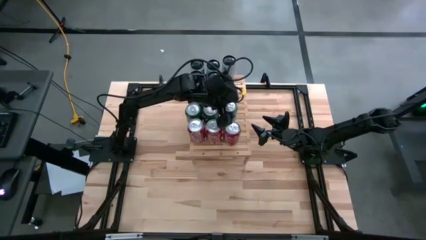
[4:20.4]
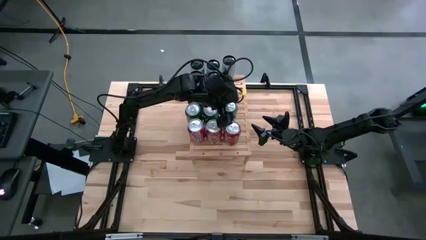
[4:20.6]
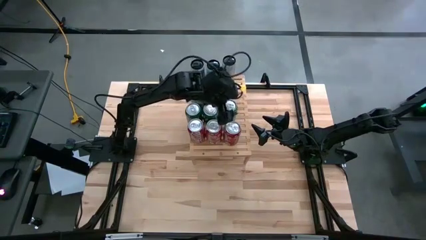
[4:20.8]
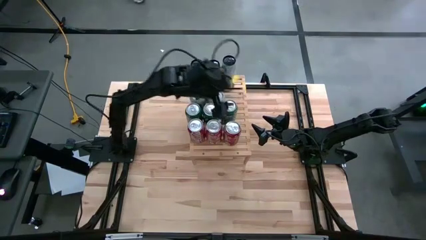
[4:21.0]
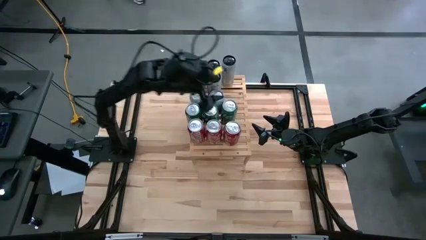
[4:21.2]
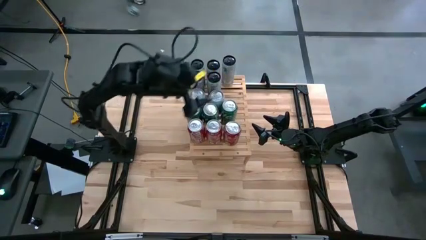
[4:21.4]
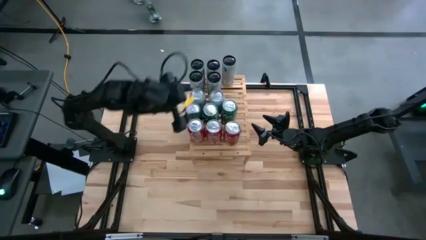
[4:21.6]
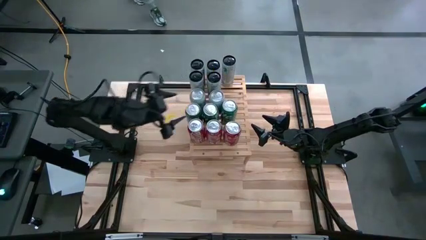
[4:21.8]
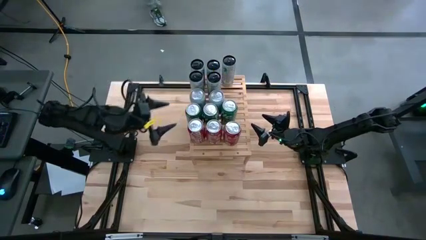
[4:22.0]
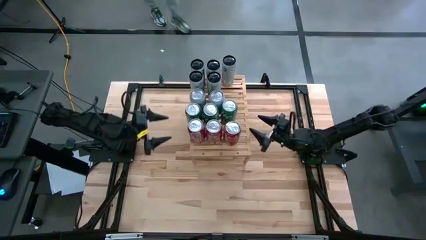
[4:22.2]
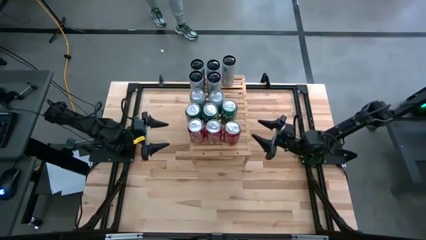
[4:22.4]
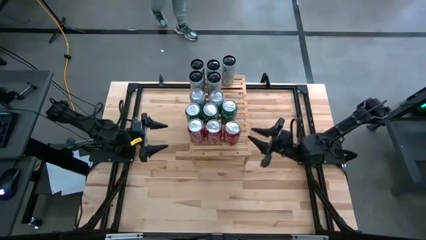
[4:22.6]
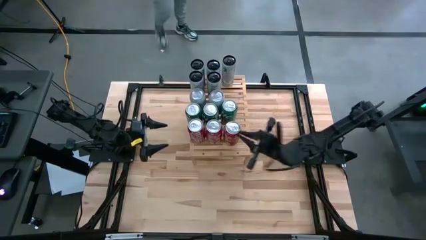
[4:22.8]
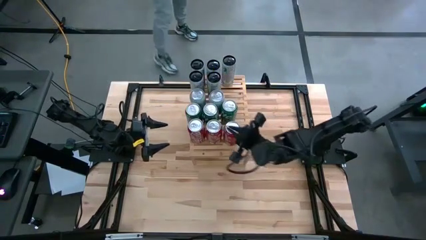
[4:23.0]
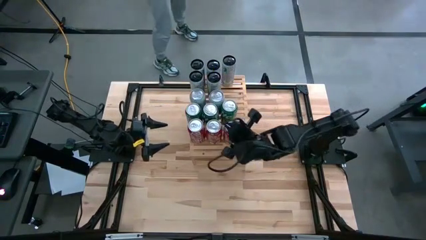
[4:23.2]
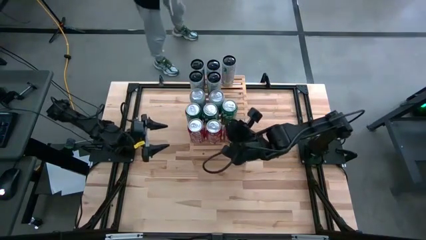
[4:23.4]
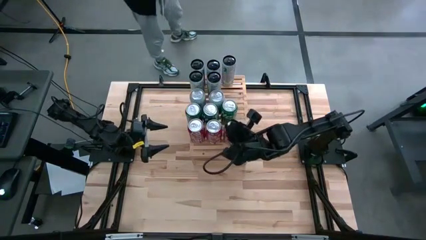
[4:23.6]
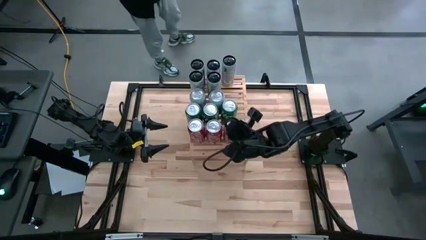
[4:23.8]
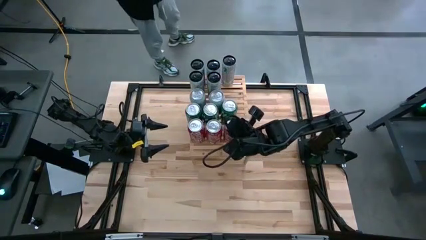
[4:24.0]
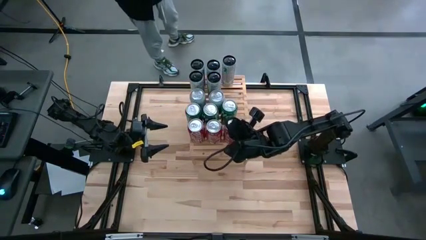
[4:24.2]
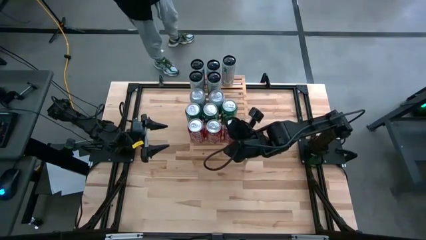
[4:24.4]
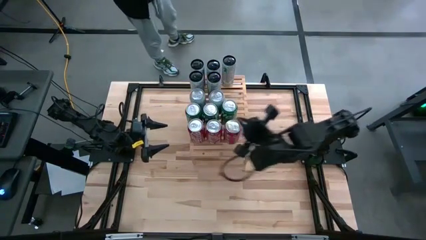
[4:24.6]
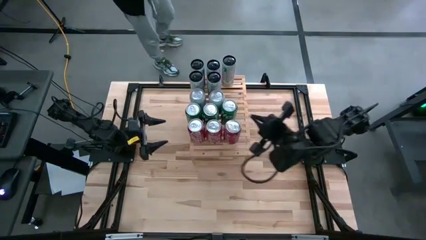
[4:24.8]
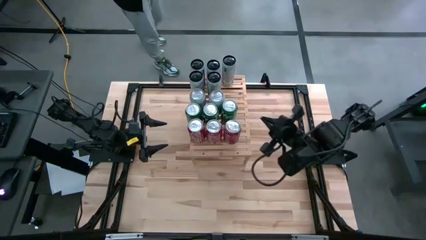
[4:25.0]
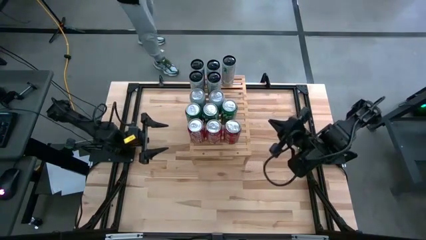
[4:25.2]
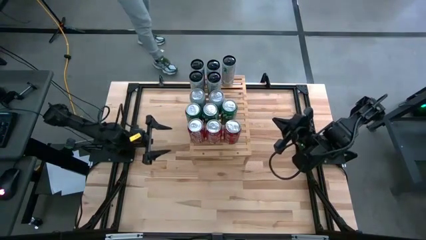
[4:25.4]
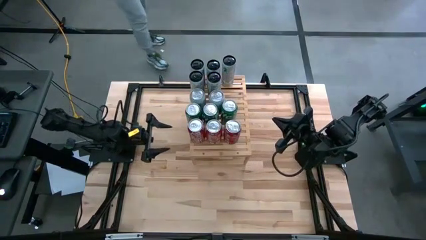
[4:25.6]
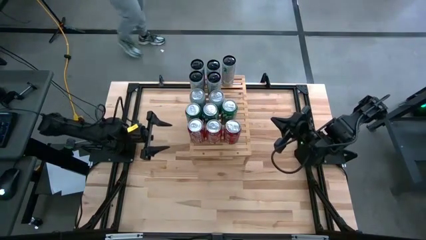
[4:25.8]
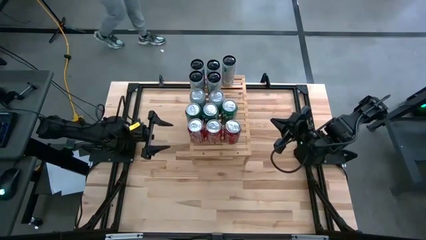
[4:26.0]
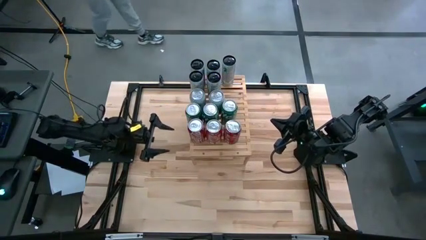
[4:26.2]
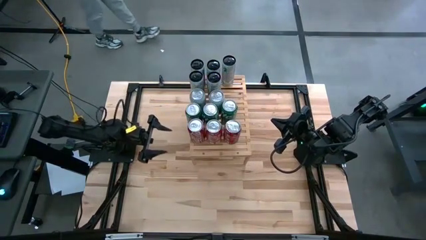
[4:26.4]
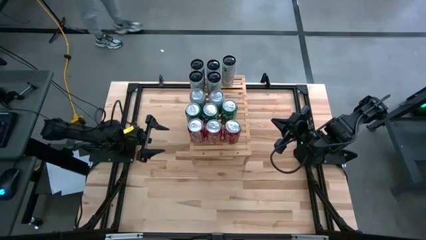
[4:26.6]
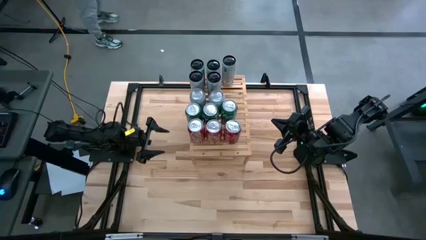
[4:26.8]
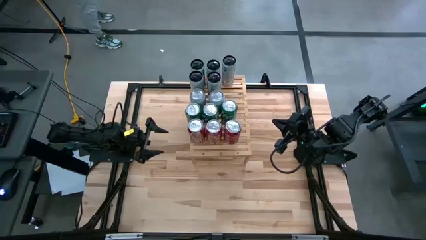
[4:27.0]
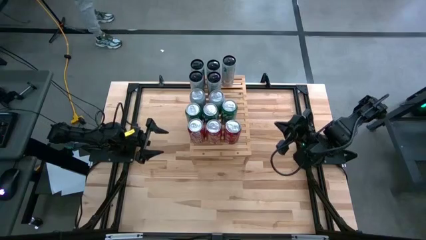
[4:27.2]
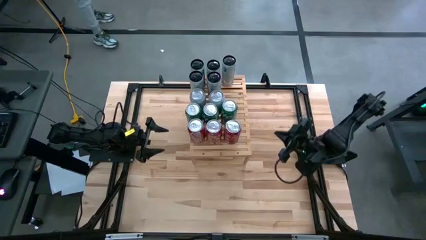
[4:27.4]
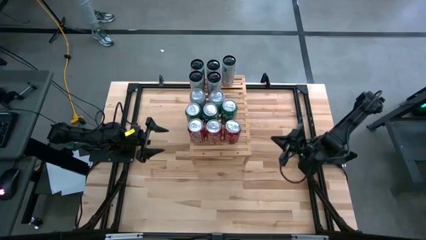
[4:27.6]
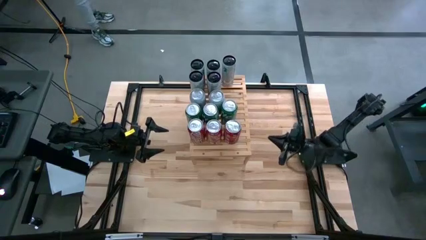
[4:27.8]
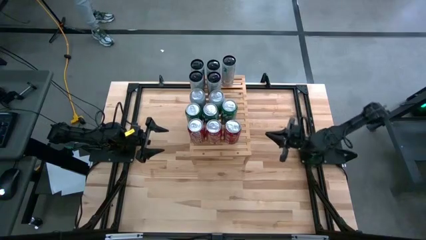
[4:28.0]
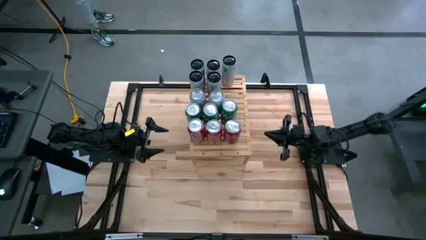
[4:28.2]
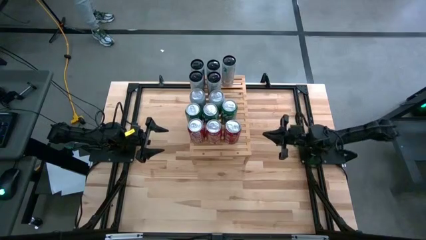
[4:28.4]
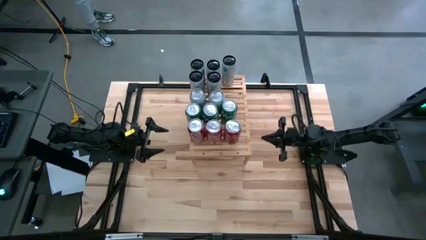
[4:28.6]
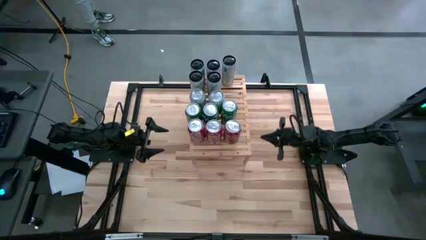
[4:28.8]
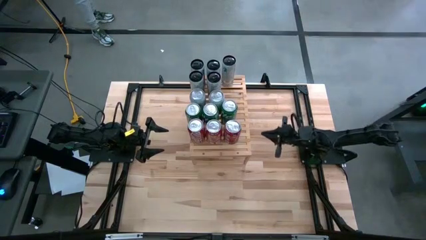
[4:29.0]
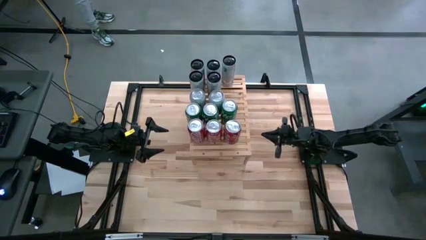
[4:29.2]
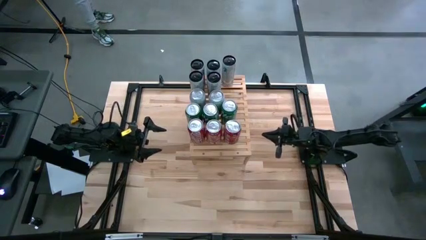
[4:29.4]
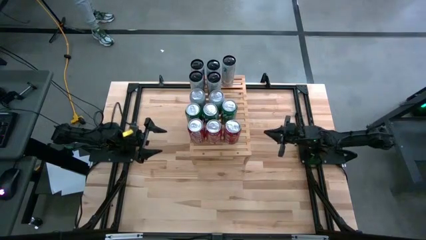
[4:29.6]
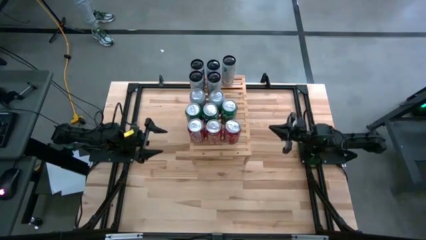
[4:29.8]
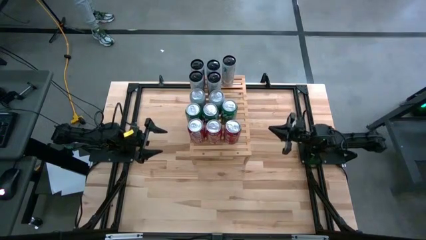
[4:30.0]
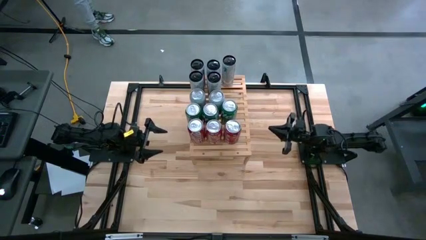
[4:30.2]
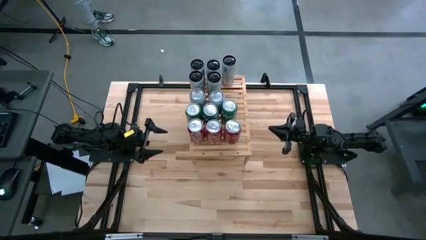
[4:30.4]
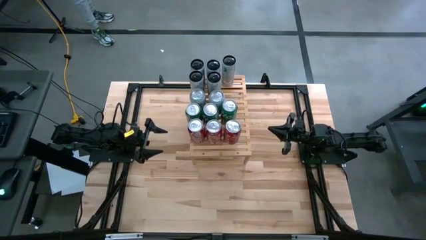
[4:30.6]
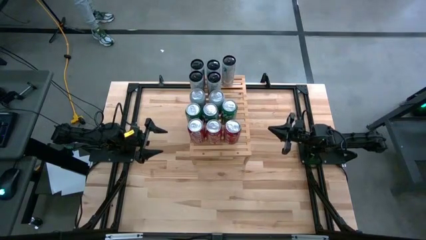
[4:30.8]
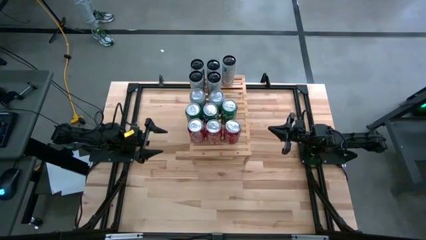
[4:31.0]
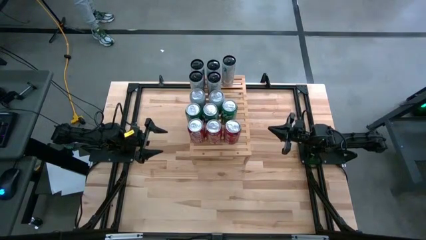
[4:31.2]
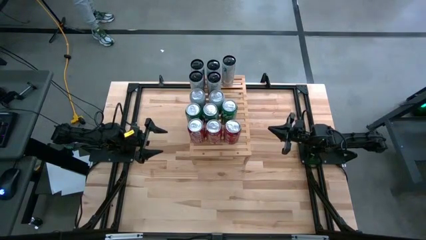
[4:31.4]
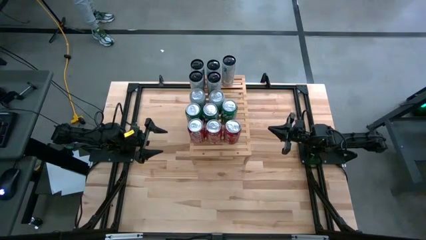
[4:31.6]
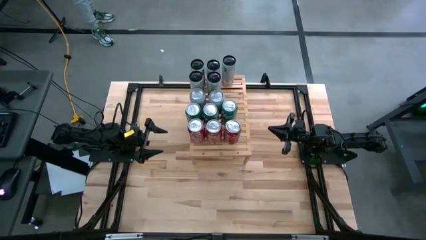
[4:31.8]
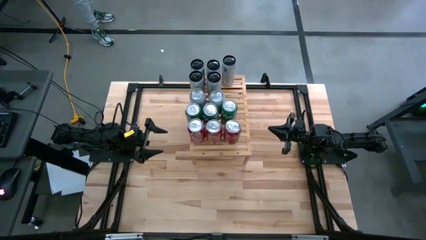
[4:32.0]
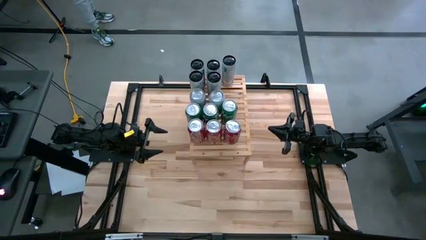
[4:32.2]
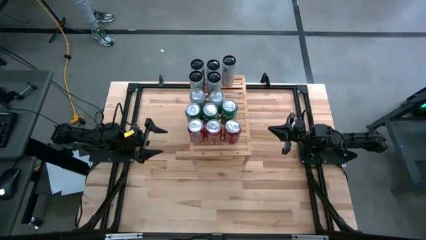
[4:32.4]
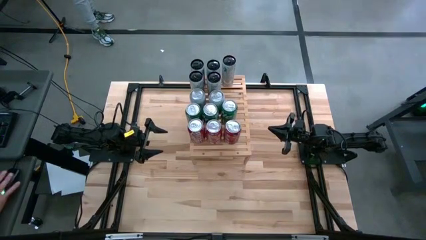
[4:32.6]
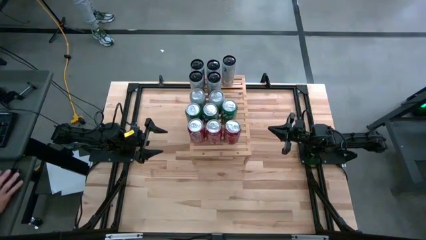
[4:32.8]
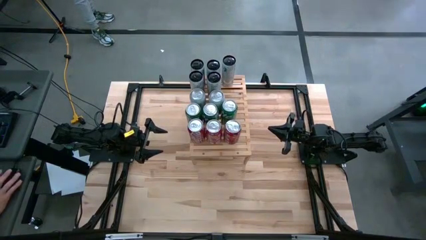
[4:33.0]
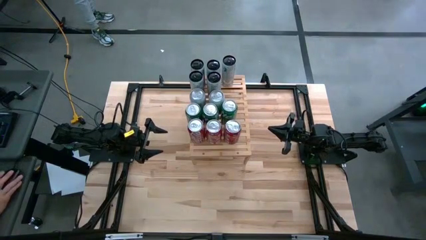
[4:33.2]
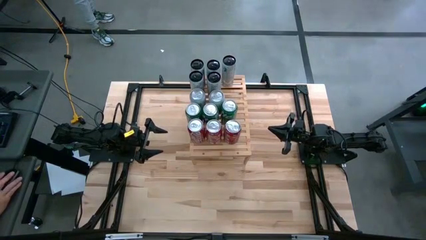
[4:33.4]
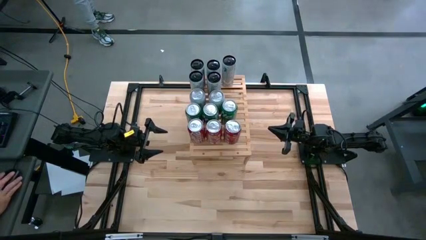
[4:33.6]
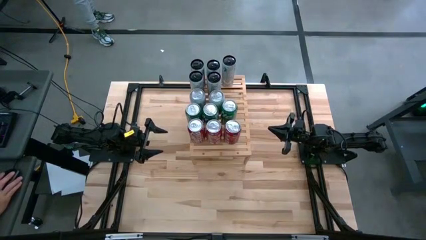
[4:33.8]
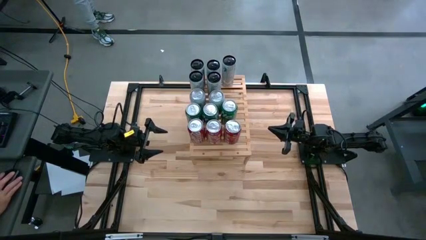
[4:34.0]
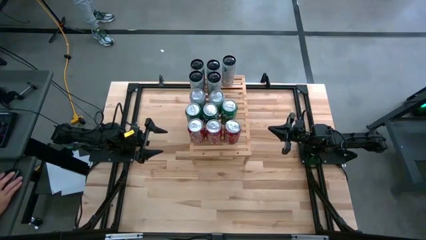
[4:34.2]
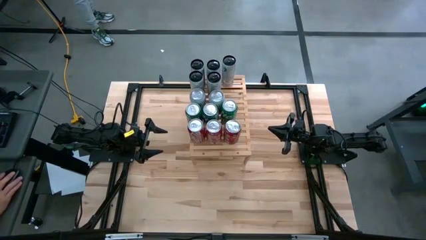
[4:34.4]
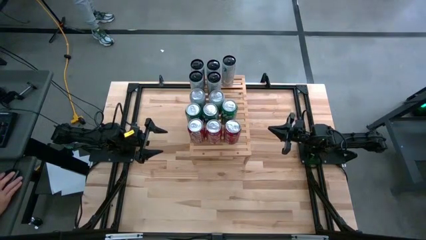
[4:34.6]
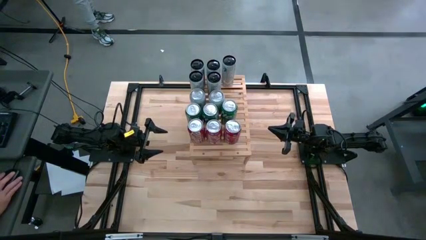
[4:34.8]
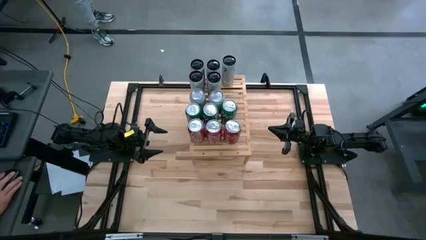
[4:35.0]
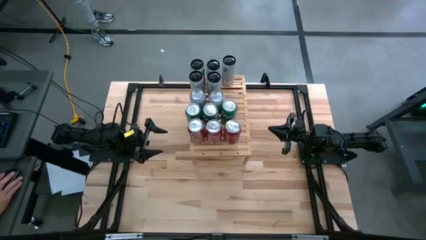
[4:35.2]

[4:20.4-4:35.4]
Task: Place canned beverage on shelf
Return to Home Position

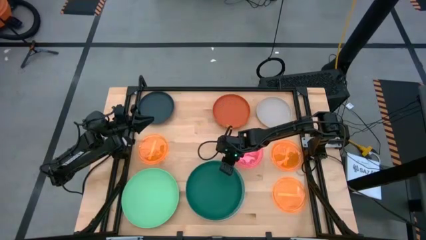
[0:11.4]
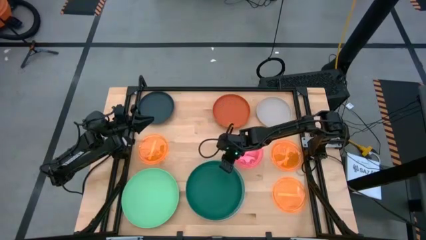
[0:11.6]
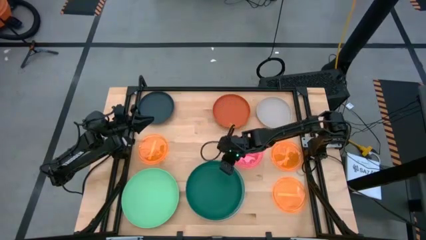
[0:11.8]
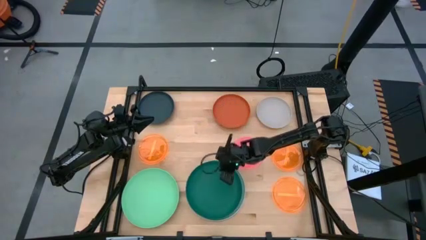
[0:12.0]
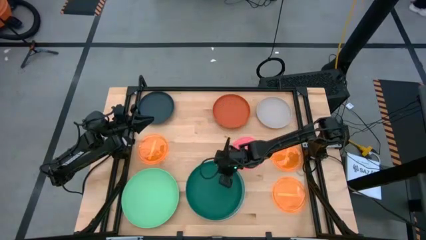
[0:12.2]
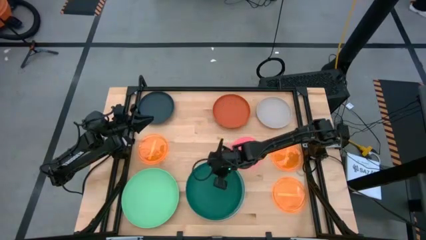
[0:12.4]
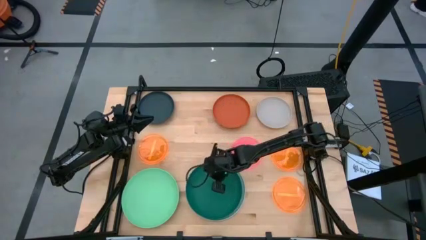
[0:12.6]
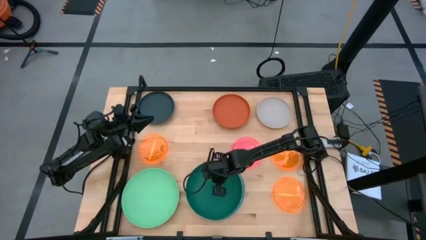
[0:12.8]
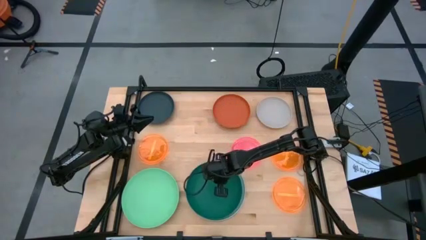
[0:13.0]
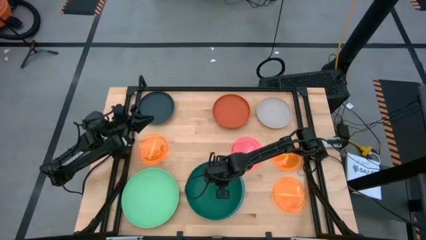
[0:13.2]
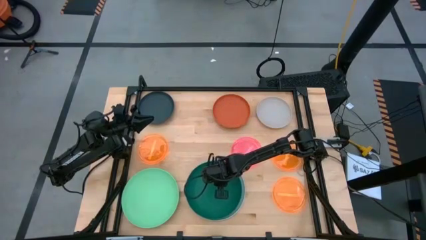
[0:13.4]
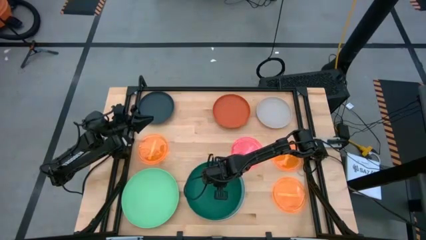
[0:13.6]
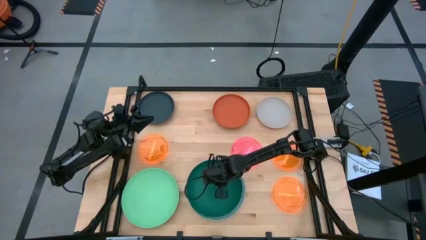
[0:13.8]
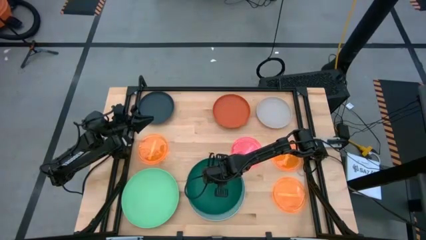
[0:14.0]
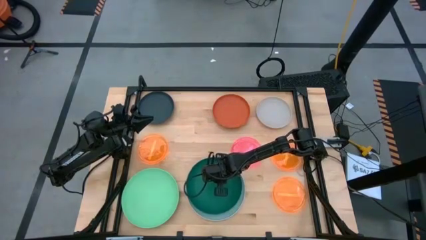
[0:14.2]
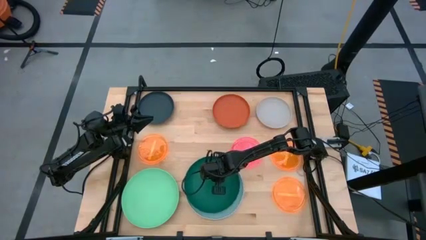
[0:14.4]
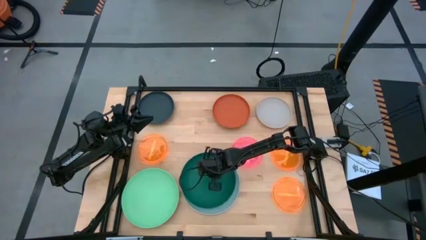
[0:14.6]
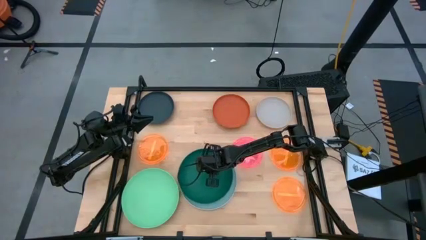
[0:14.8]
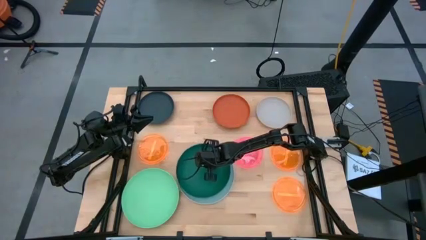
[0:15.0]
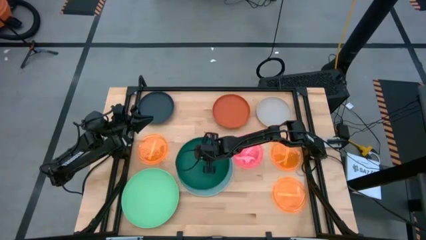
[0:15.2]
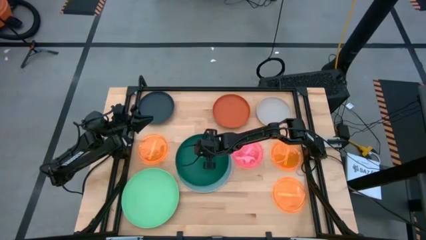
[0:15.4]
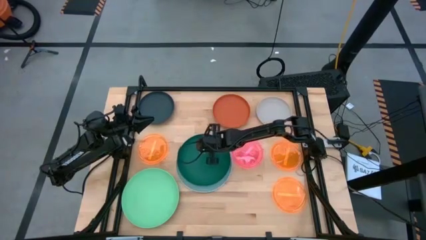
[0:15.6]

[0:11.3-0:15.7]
Task: Stack plastic plates
Adjust the stacked plates
